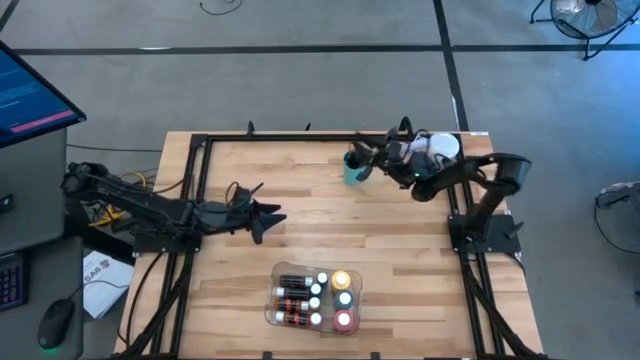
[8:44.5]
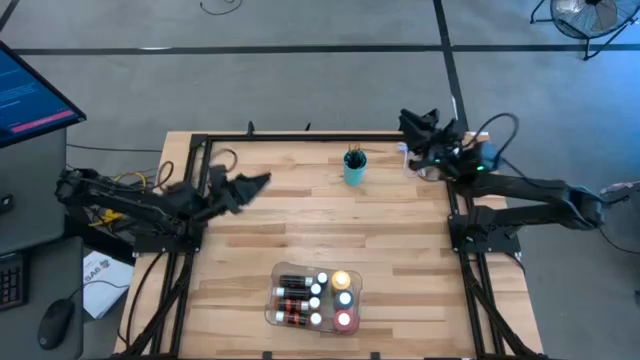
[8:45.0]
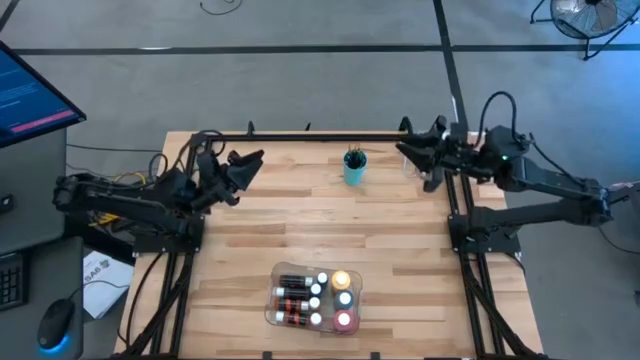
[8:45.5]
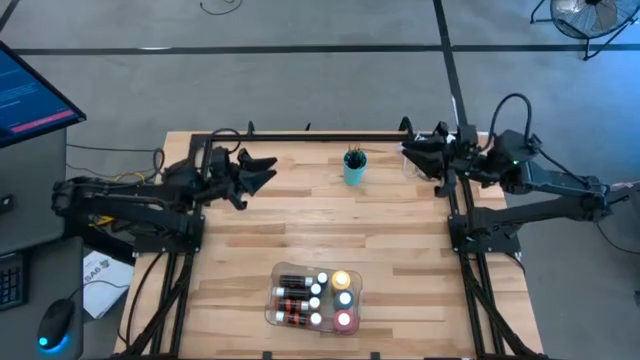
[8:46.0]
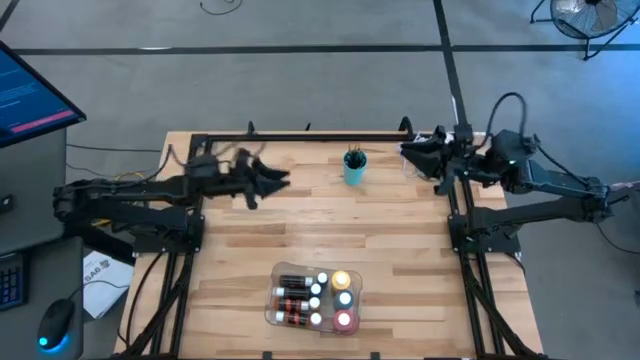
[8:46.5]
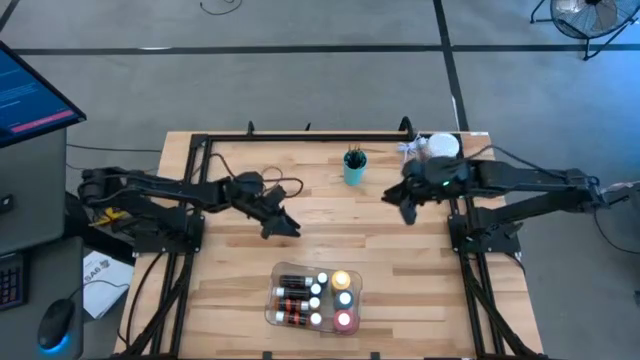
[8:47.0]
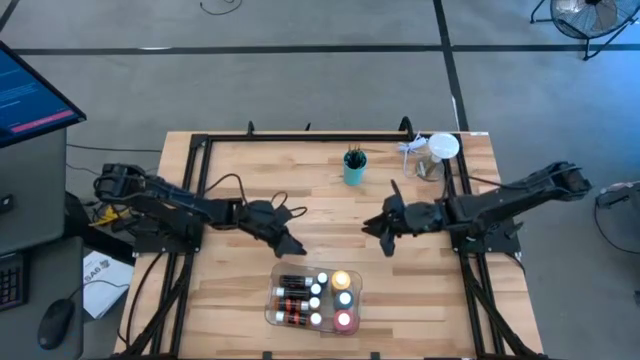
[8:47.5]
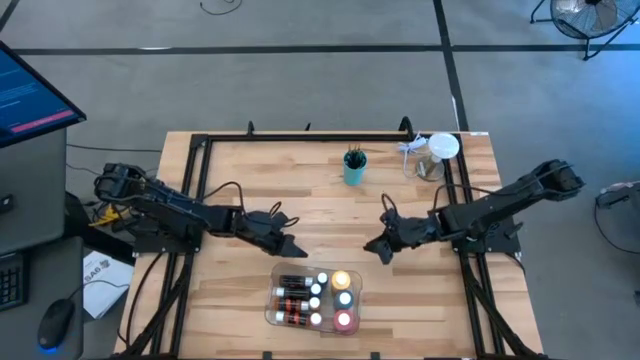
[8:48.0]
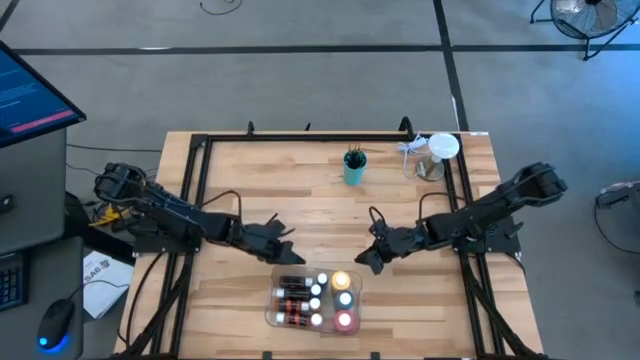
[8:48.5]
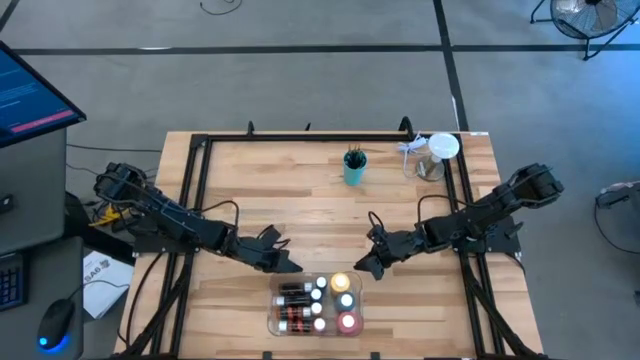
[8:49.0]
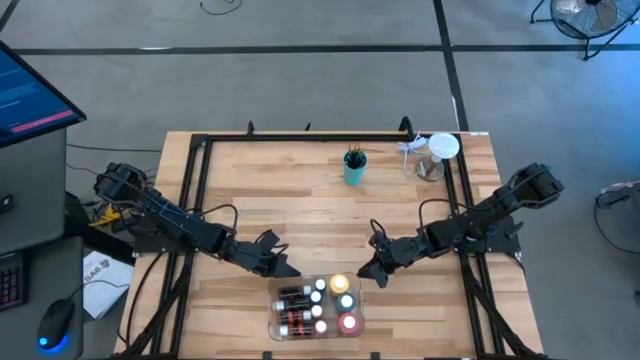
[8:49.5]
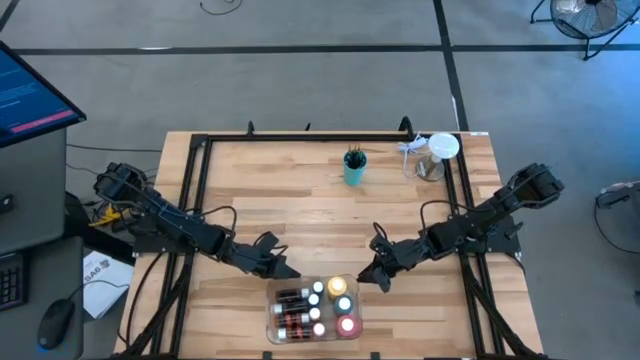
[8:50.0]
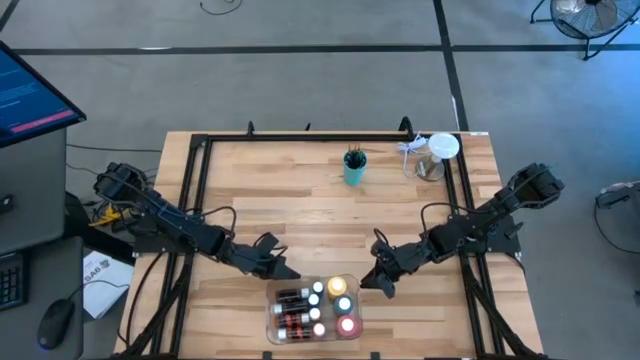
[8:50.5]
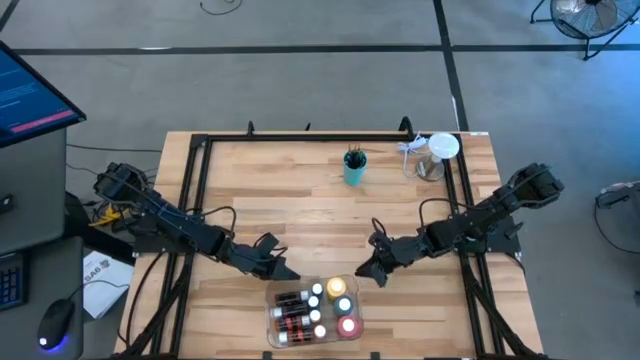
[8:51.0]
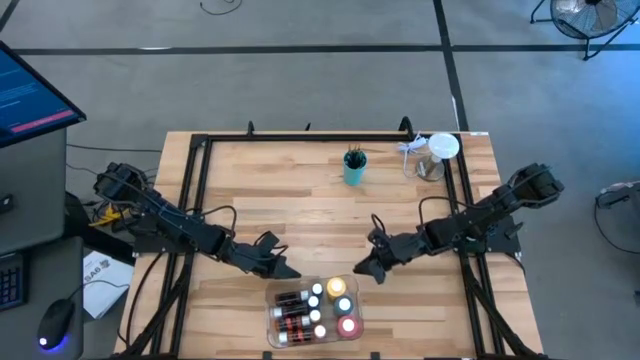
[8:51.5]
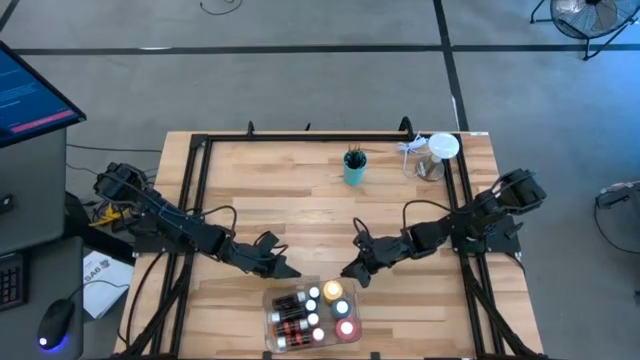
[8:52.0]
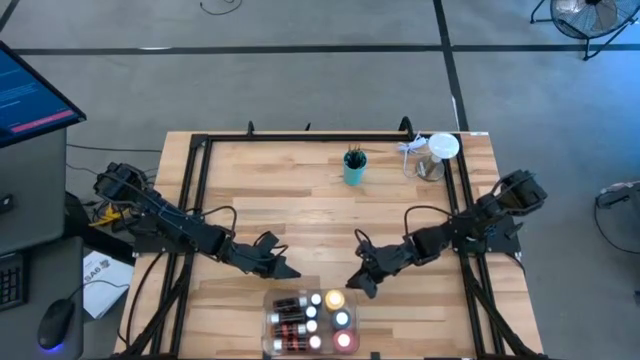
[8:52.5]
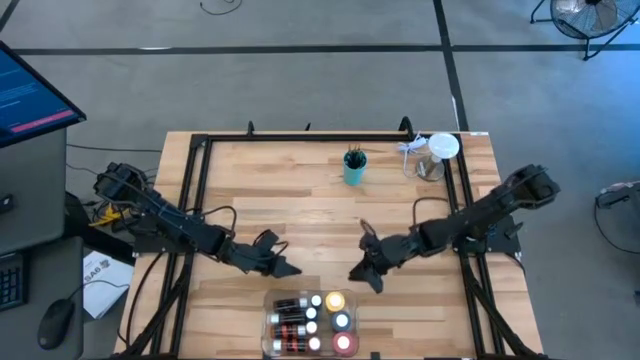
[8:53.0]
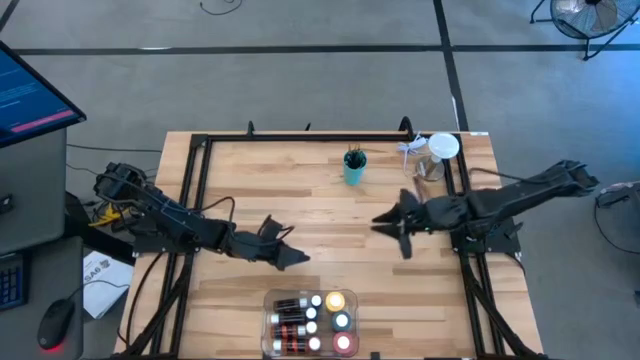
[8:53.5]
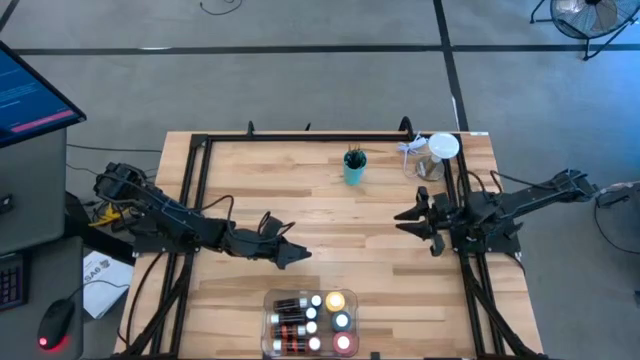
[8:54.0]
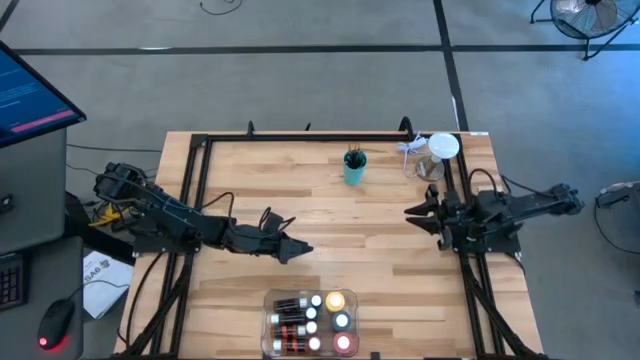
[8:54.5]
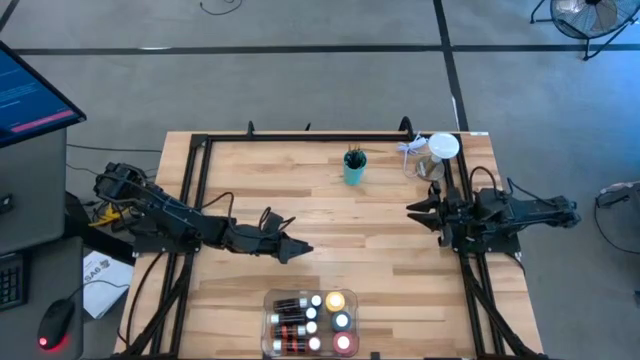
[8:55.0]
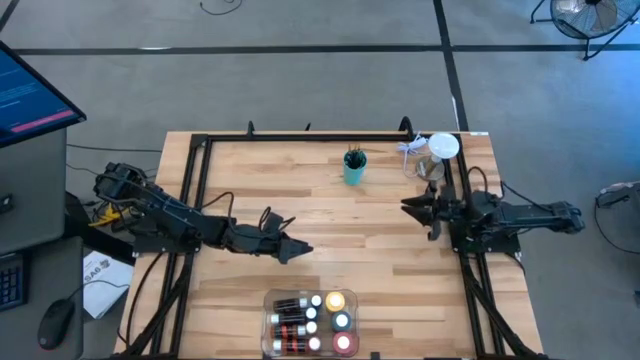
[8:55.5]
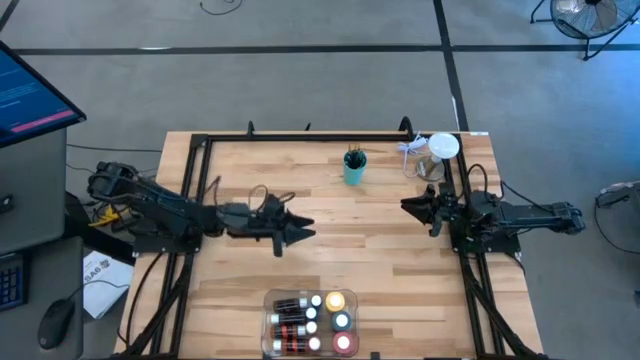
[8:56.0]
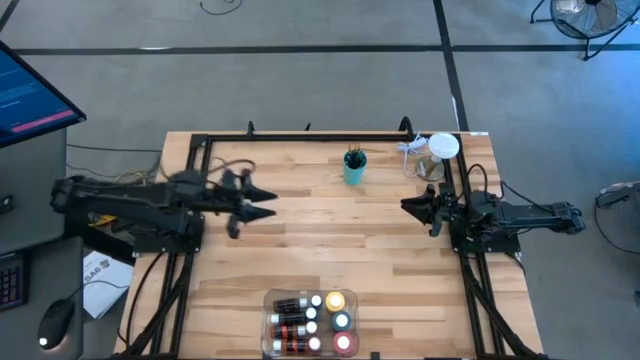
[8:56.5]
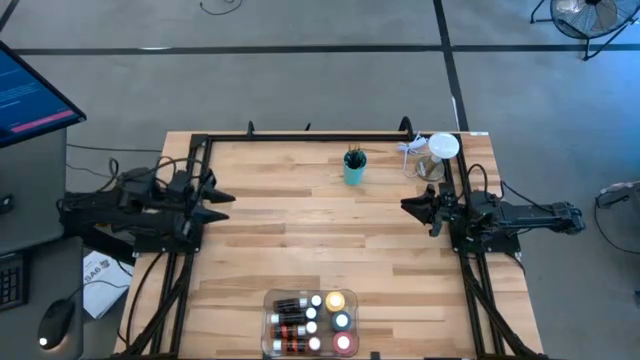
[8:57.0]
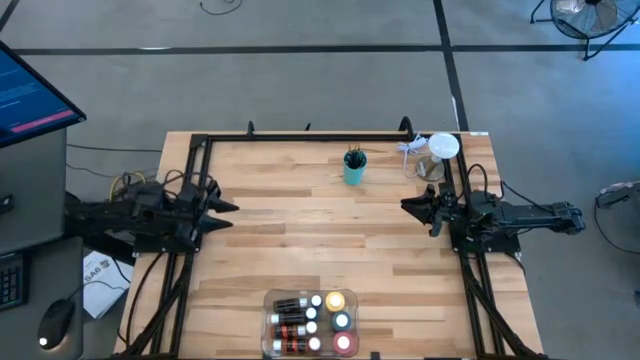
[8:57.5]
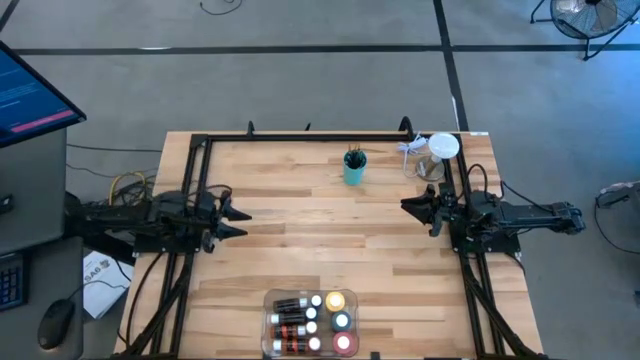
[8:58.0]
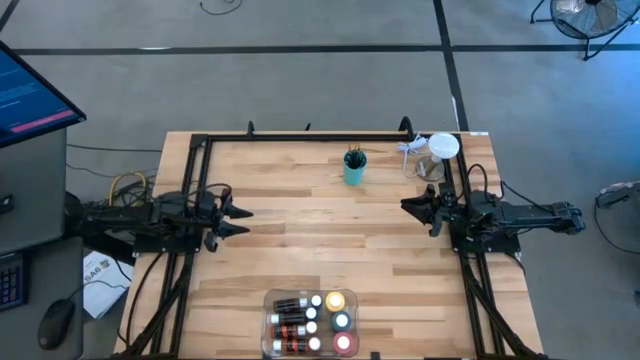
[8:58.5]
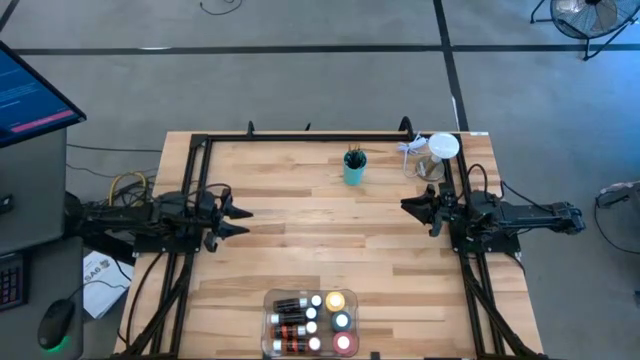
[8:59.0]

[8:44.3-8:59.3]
Task: Pick & Place Paint Supplies
Return to Home Position

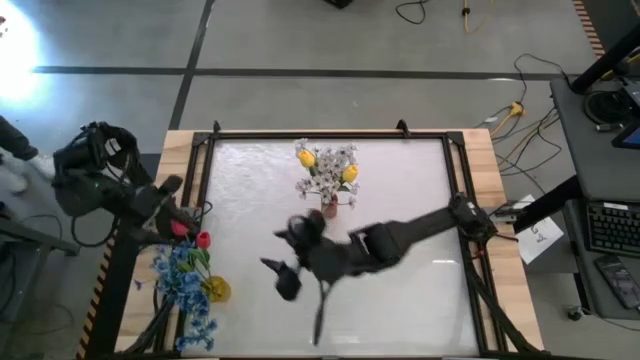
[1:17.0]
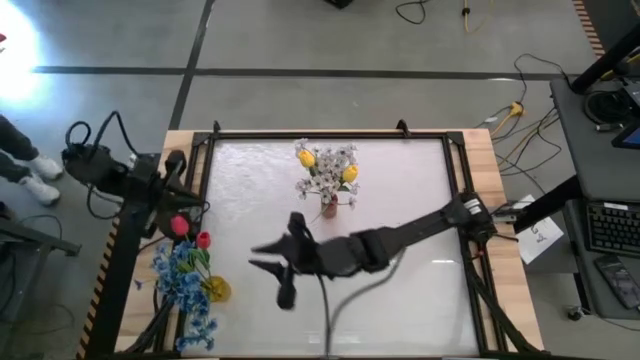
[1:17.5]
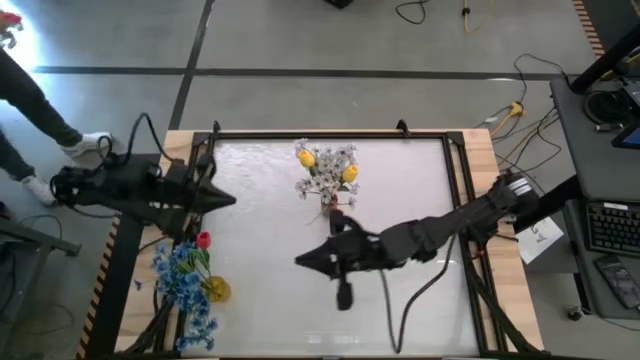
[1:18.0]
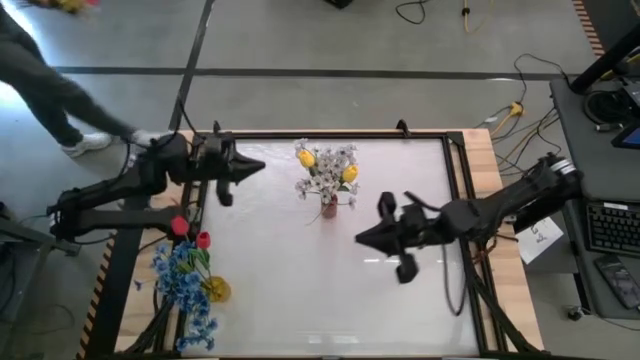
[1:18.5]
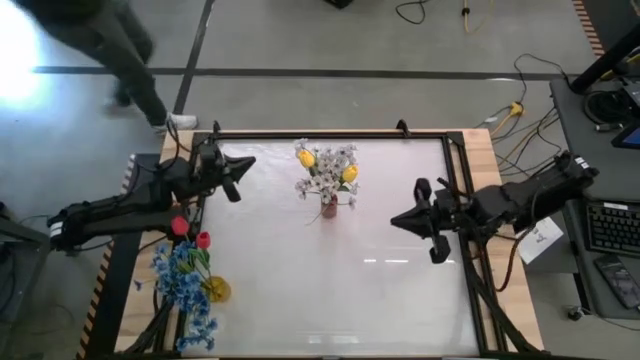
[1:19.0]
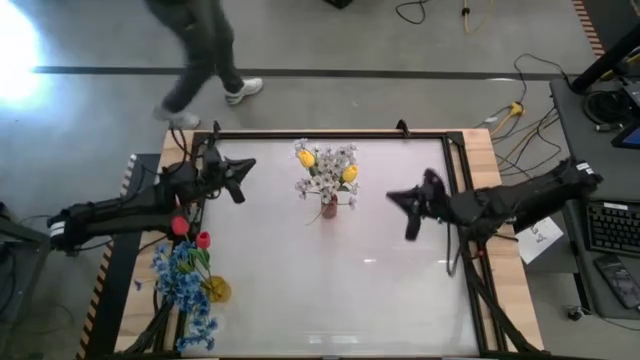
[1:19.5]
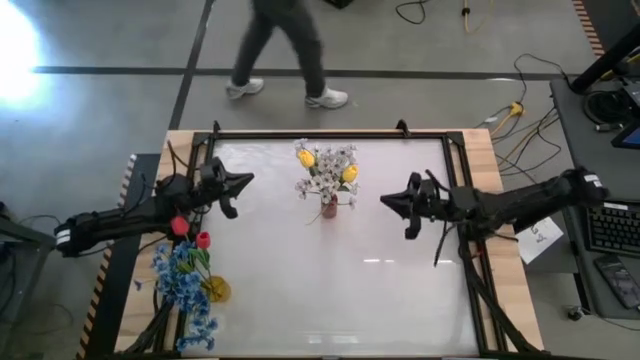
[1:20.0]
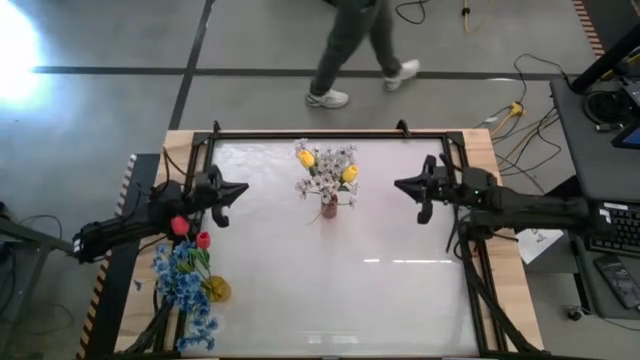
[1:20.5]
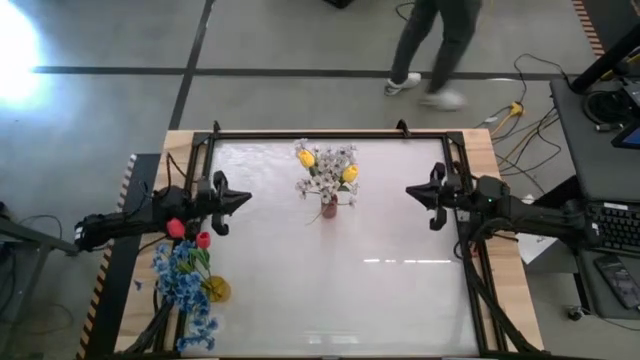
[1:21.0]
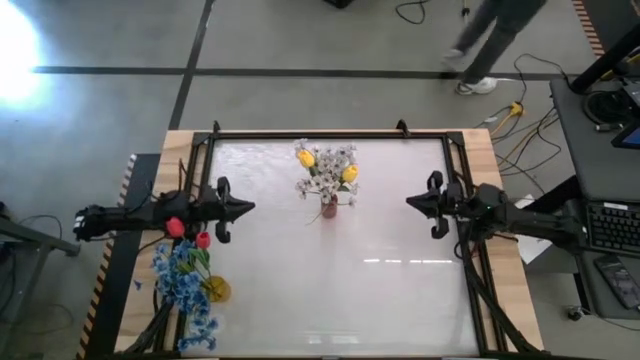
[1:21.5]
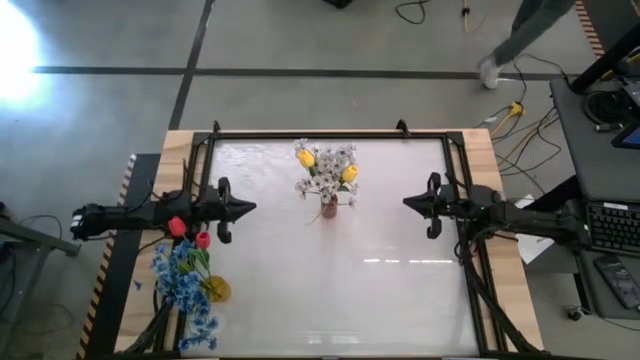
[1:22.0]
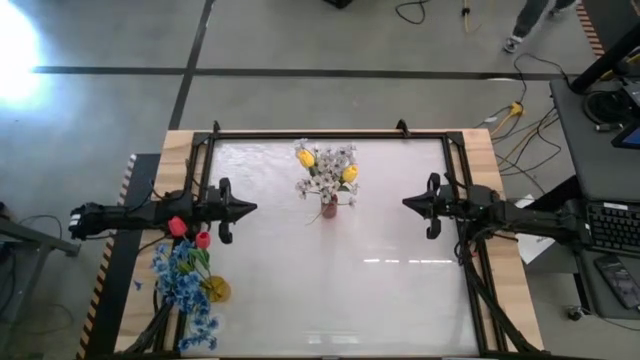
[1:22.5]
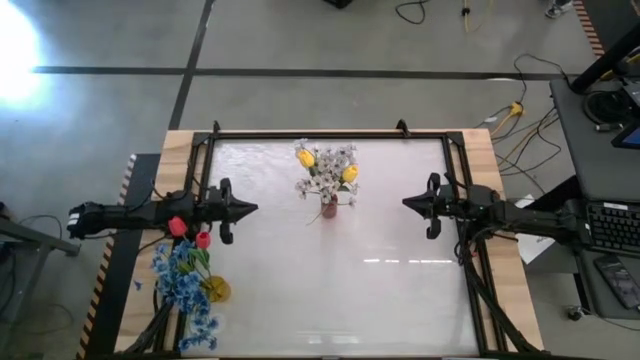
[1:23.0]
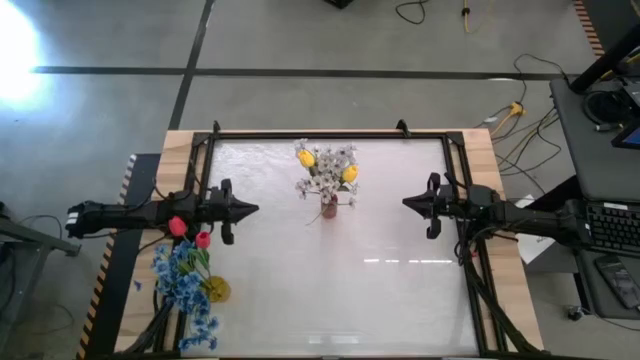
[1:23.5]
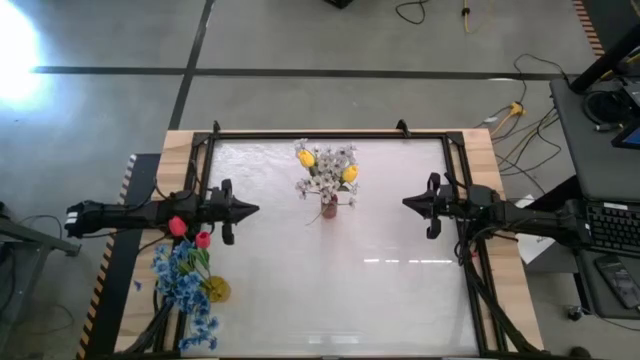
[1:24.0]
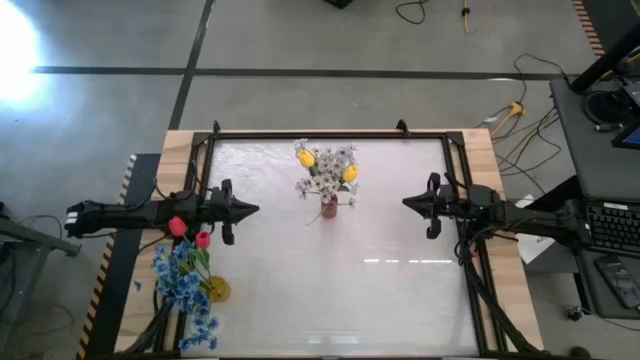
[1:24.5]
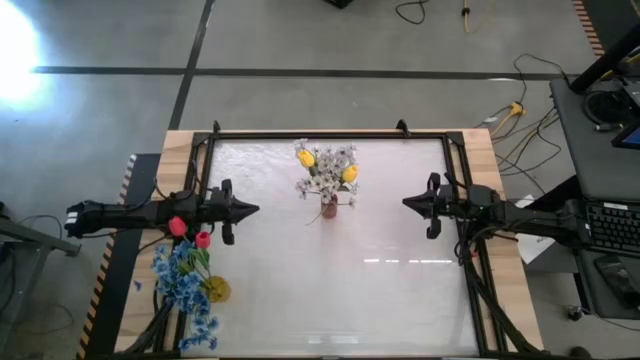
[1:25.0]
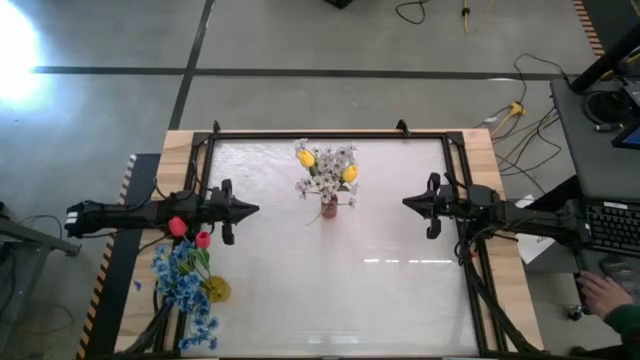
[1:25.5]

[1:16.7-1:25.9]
Task: Sort flowers into vase by color
Return to Home Position
